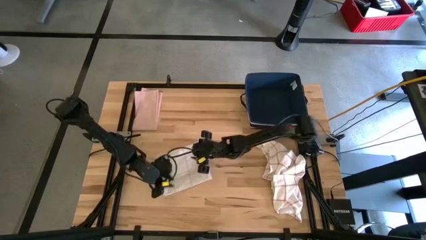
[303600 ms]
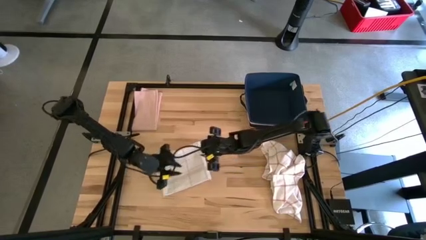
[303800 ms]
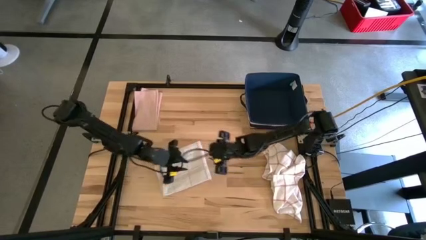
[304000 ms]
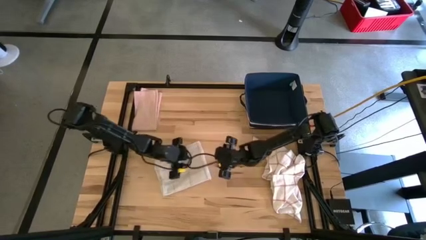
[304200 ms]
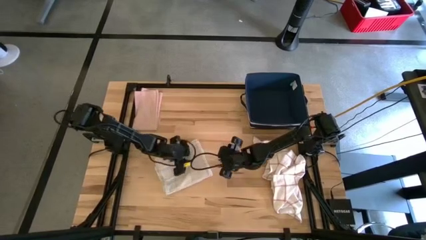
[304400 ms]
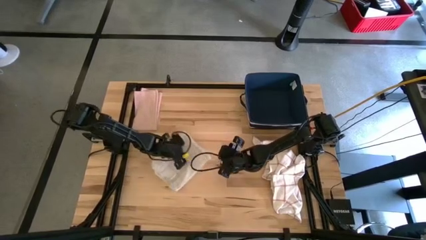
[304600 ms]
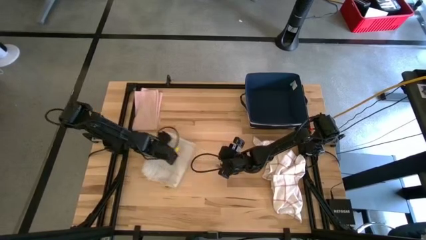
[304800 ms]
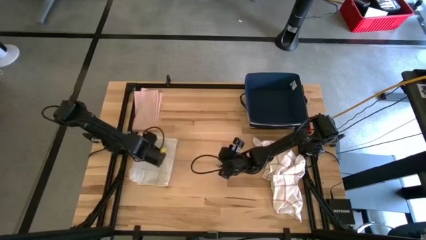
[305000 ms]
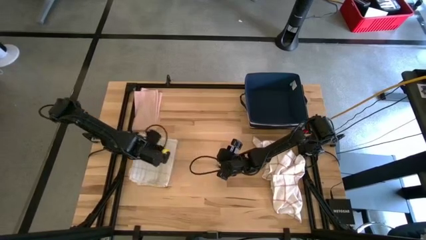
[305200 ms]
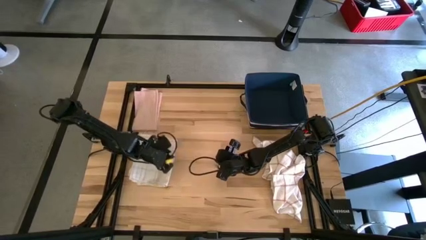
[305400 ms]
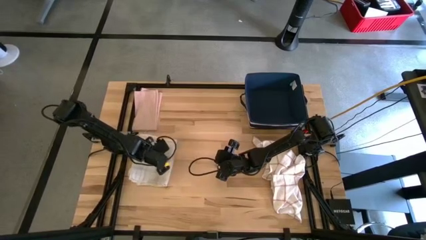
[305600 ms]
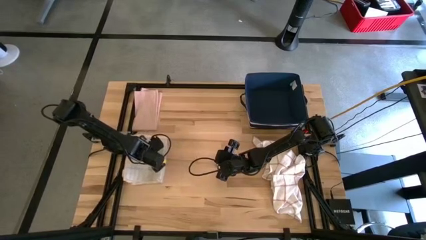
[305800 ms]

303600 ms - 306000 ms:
Task: Fold towel
Move the white patterned towel to the left

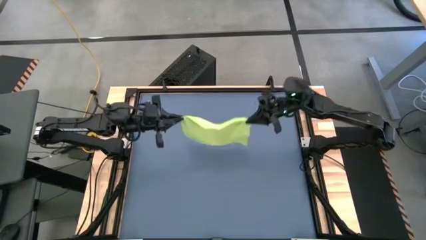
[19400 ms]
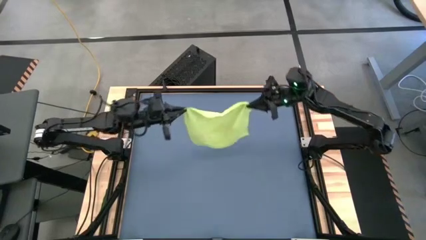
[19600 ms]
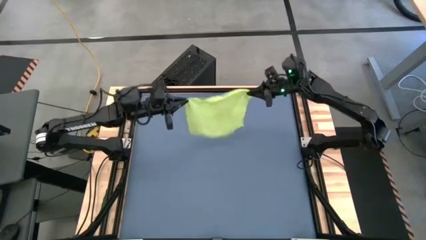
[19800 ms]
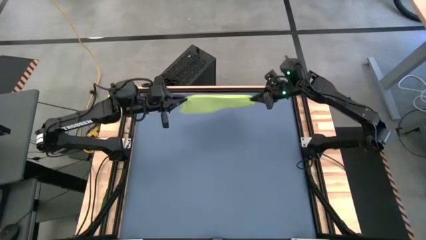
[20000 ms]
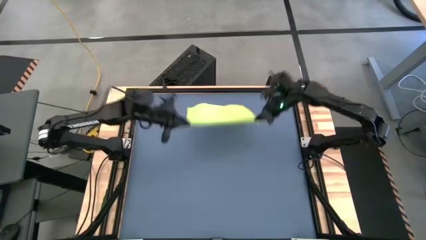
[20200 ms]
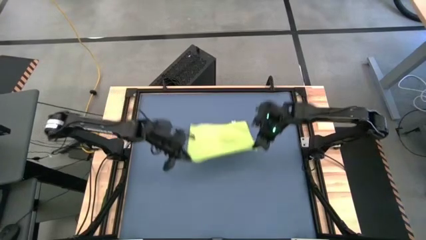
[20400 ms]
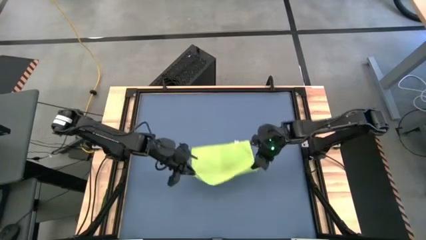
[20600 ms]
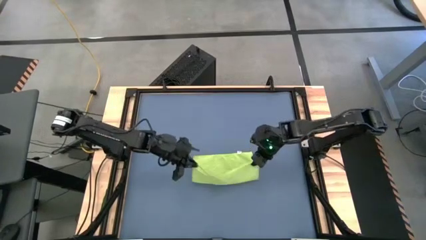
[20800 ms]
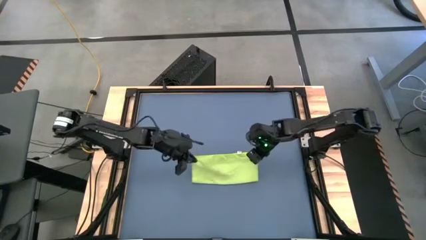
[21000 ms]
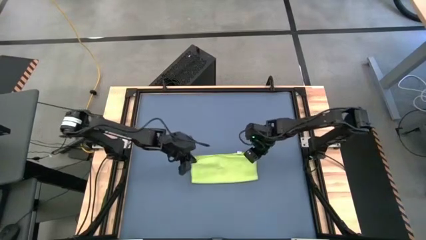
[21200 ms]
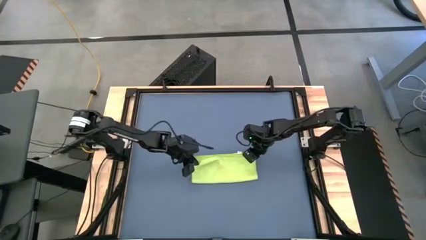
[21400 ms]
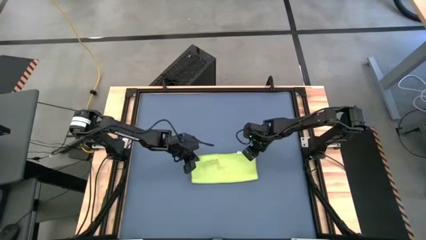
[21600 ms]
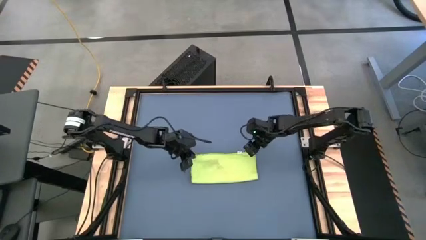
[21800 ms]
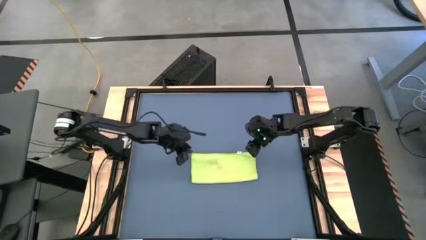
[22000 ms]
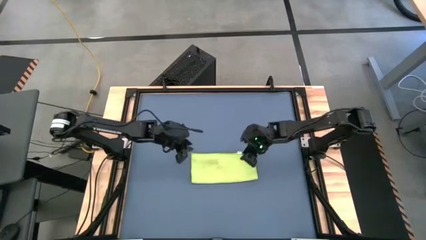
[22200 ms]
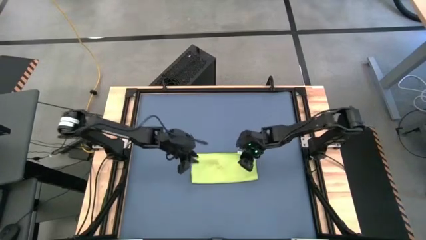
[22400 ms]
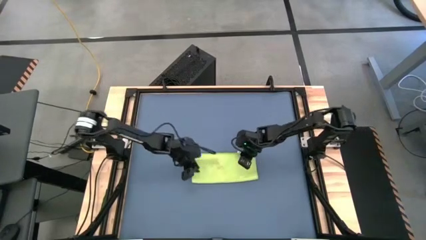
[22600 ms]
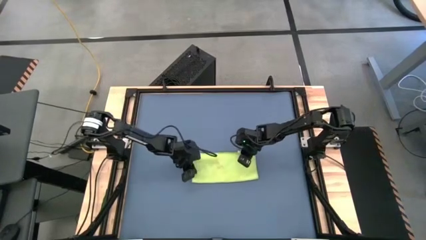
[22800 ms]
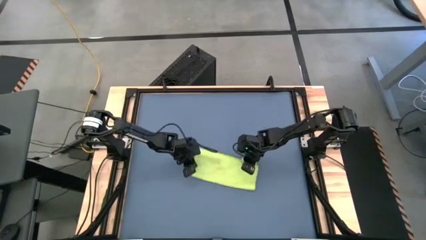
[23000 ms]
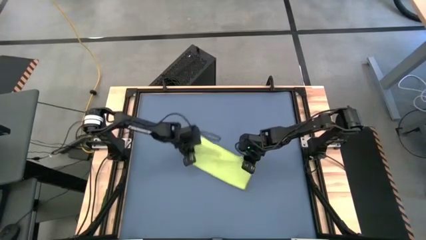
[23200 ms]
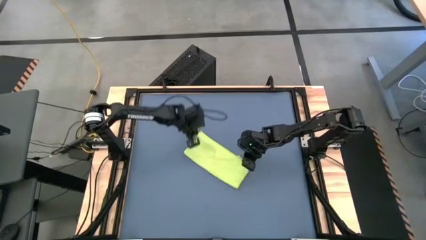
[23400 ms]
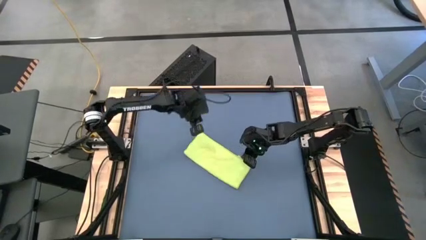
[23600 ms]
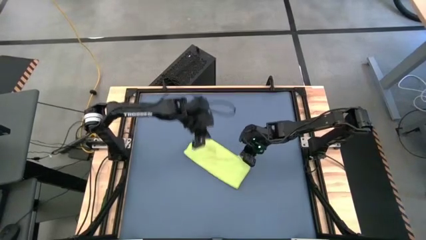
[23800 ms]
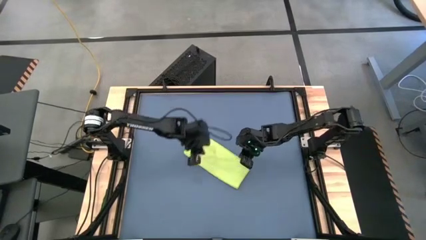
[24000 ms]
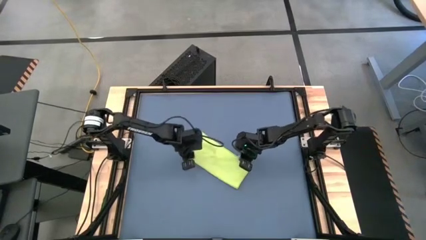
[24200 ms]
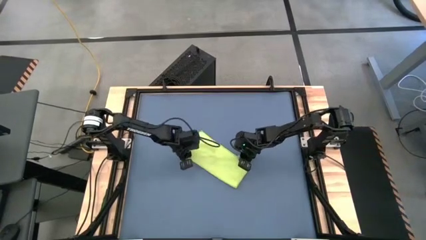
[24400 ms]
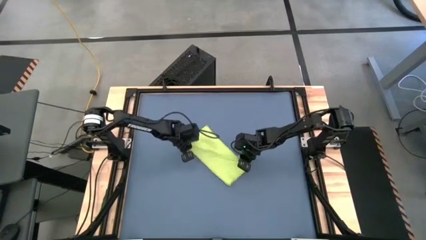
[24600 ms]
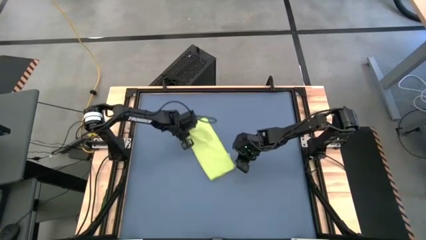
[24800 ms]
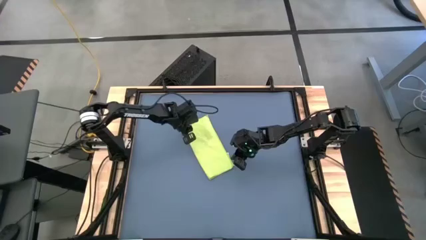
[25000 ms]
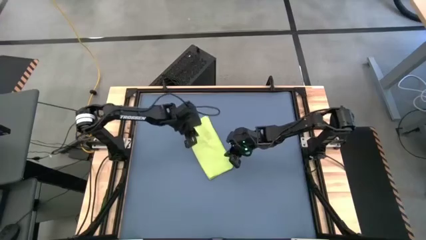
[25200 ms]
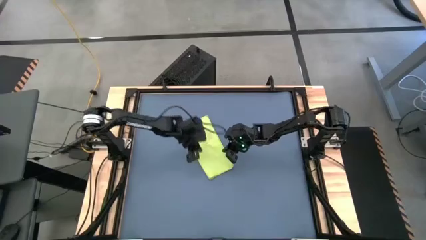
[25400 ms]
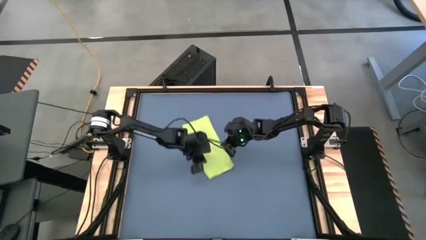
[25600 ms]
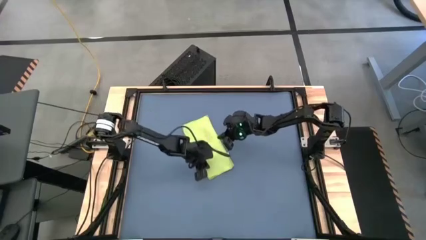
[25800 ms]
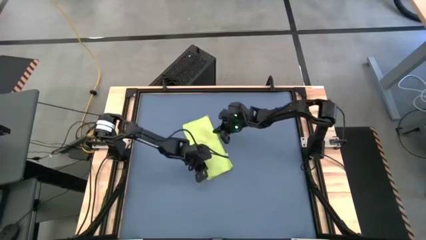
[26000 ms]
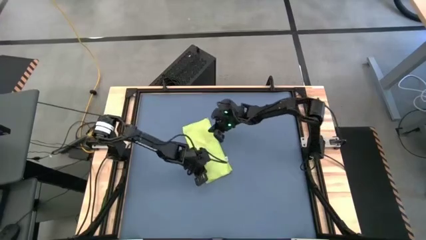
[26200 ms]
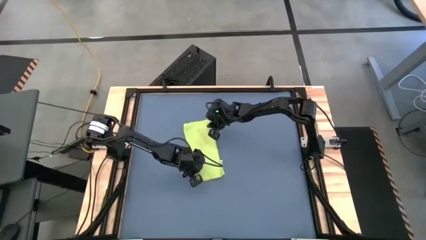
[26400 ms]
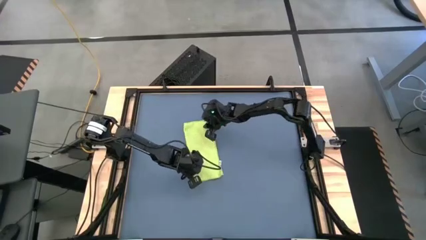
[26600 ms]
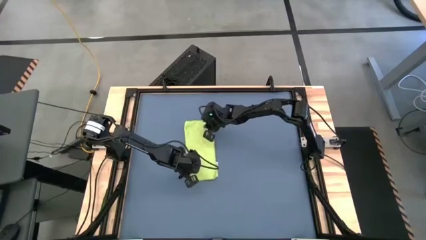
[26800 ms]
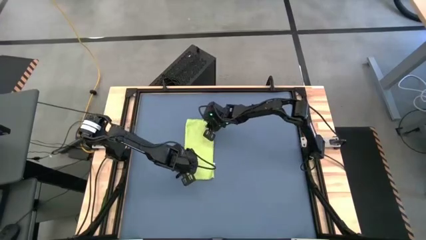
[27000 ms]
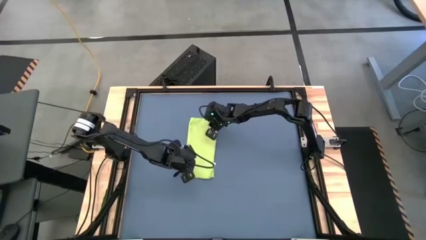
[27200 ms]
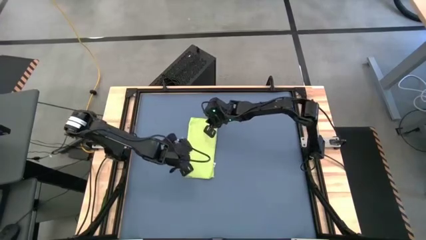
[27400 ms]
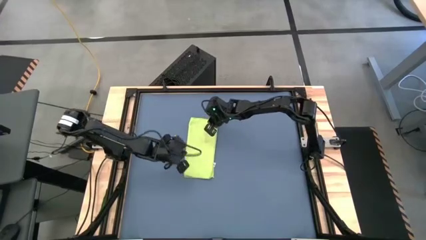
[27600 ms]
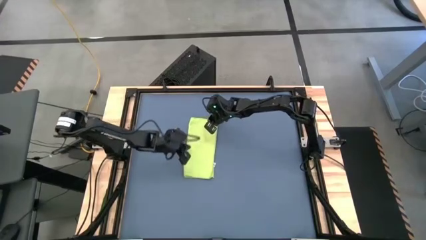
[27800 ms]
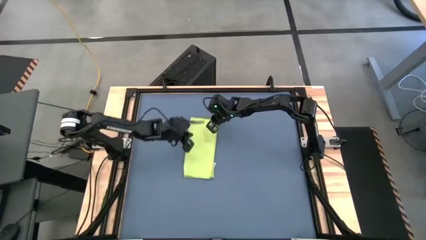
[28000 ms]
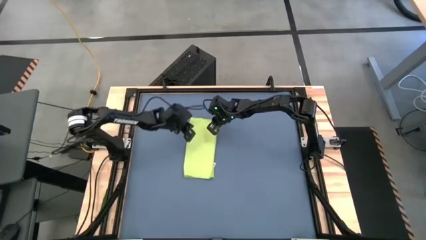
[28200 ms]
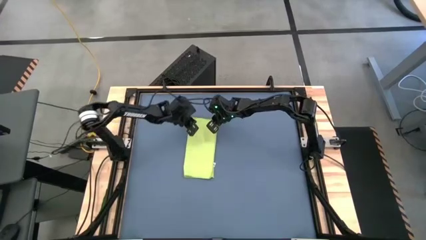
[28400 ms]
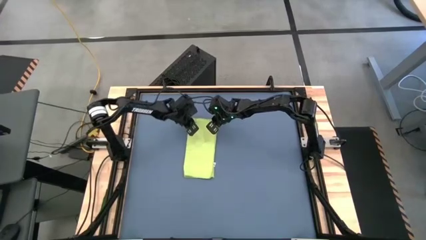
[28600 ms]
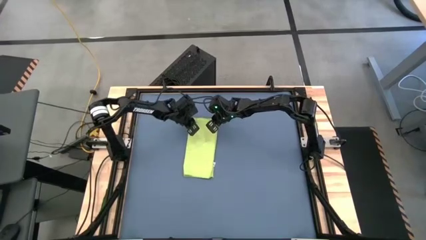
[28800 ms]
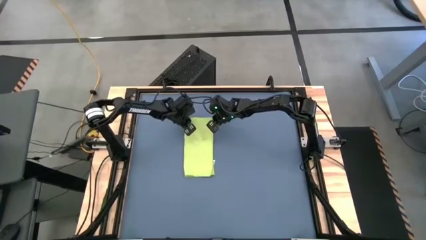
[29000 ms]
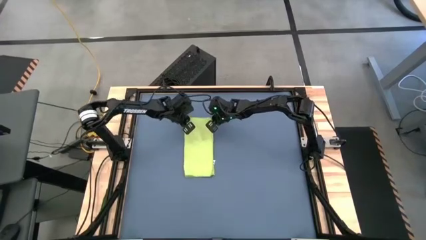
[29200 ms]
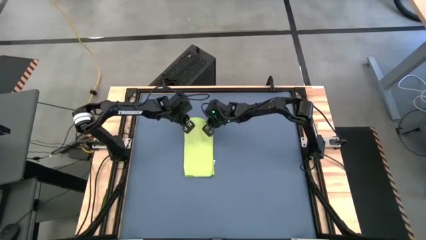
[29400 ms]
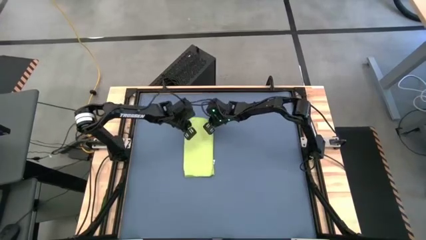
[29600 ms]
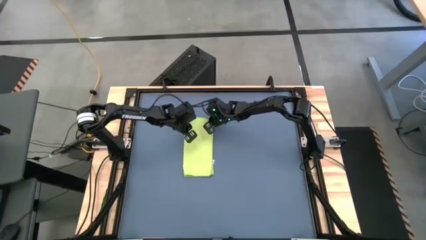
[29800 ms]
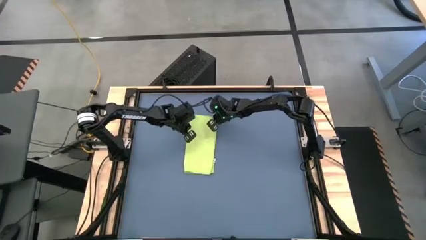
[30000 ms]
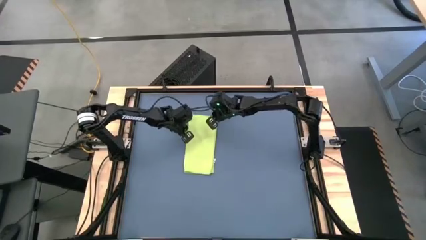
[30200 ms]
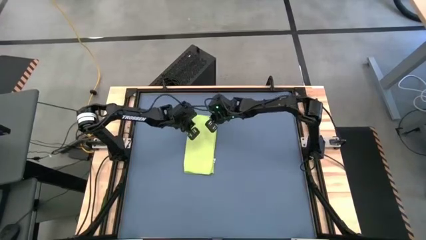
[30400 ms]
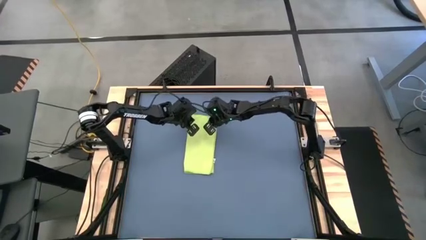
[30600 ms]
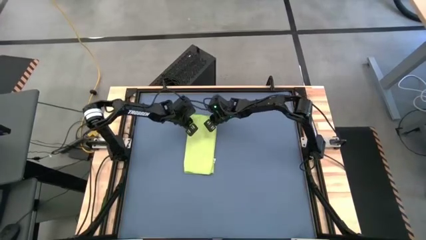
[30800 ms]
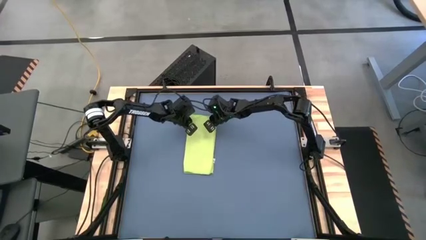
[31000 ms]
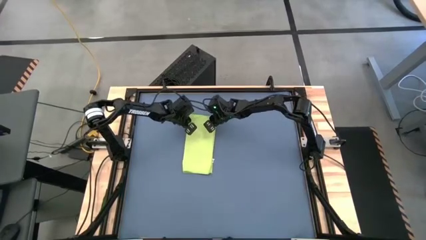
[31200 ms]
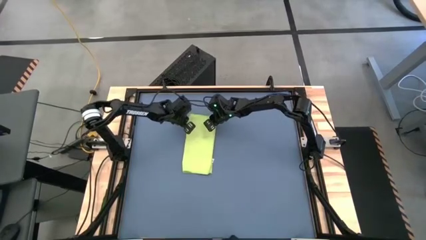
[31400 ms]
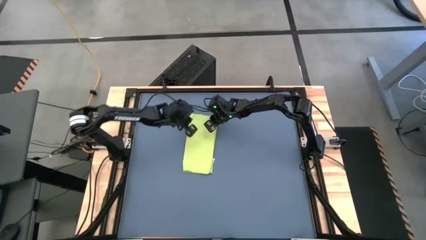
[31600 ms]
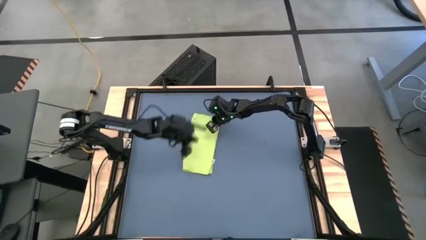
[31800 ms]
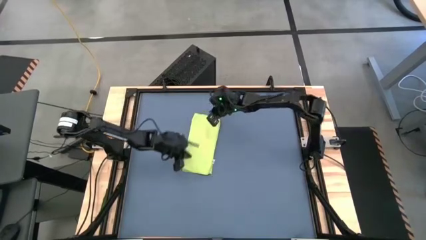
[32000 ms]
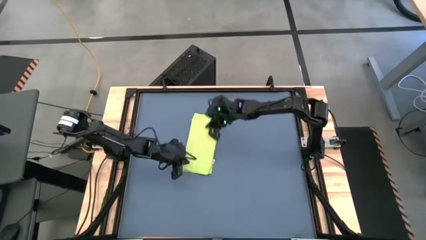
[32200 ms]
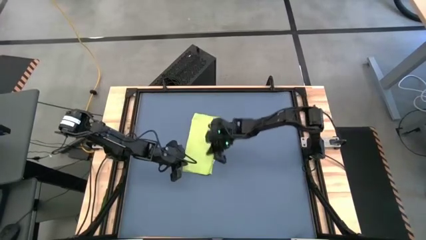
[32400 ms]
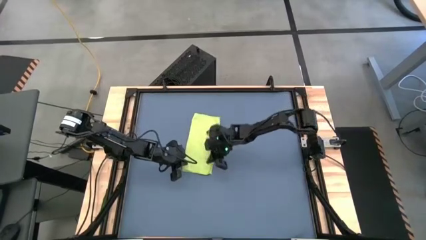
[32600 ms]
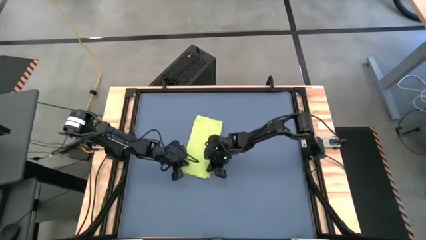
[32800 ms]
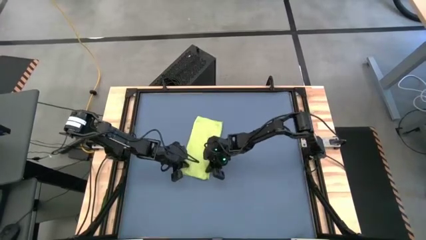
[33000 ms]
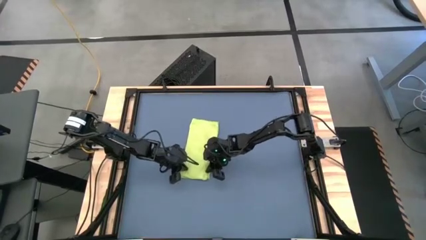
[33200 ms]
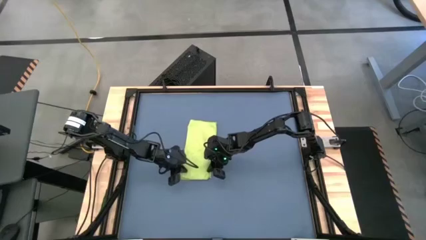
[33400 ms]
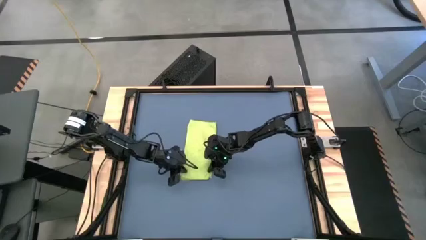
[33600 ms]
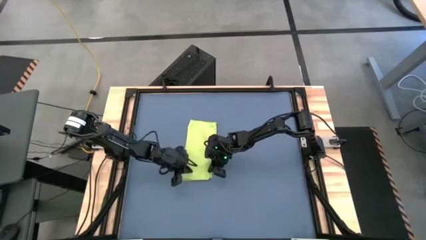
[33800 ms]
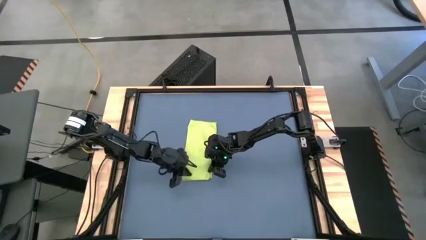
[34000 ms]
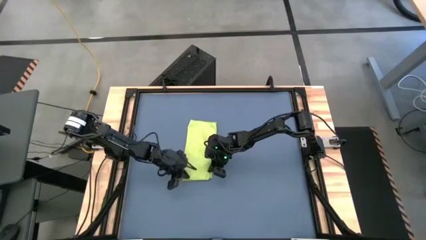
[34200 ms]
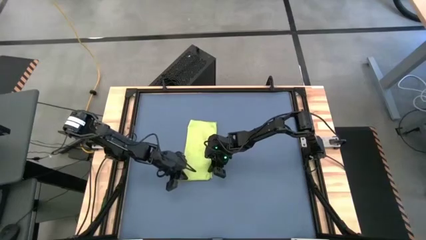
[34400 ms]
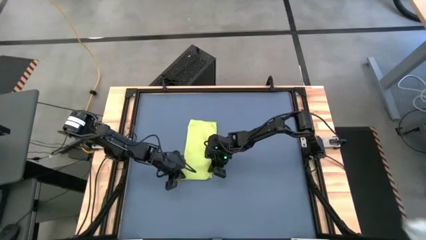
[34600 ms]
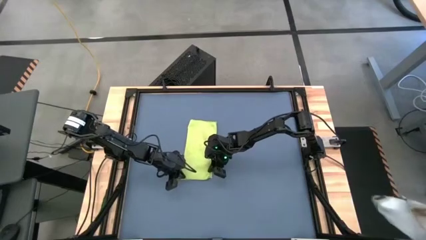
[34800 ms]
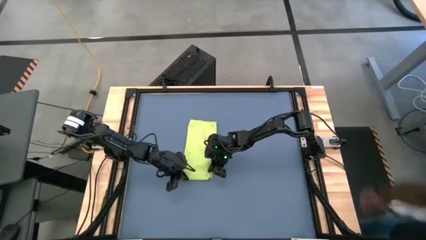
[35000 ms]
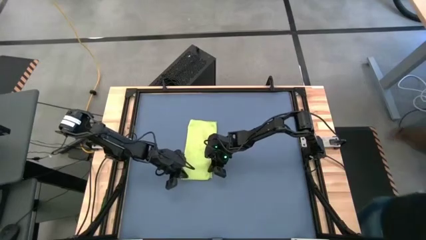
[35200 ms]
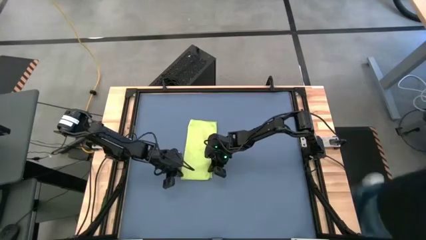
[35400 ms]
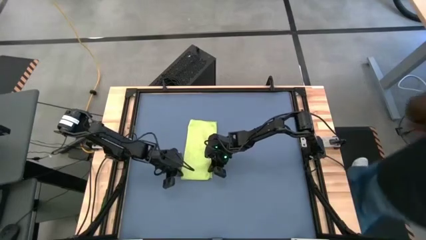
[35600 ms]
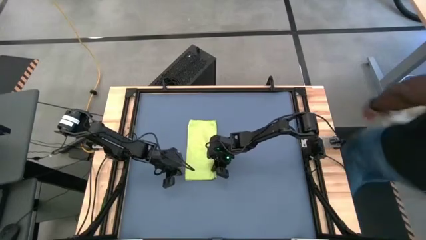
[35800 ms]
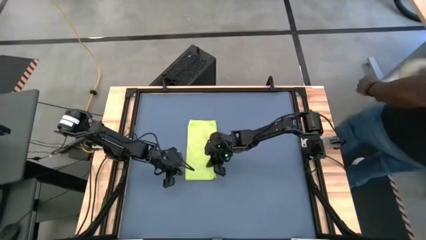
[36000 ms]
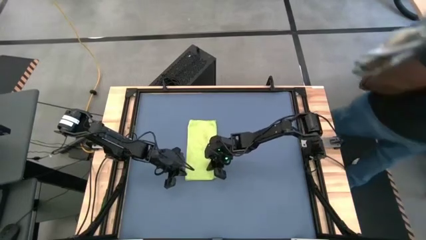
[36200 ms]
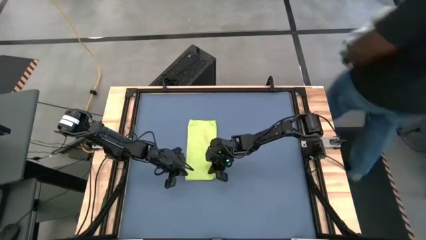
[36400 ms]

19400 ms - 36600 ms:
Task: Roll towel
Roll the green microfiber towel
